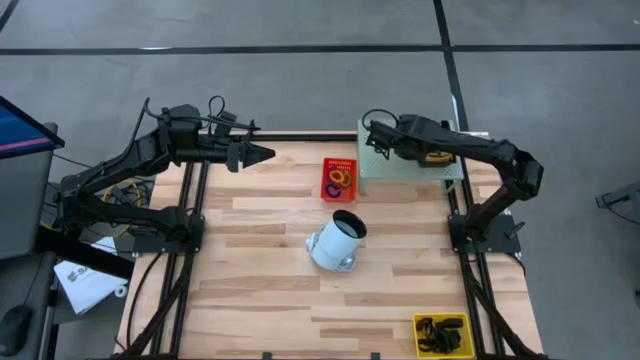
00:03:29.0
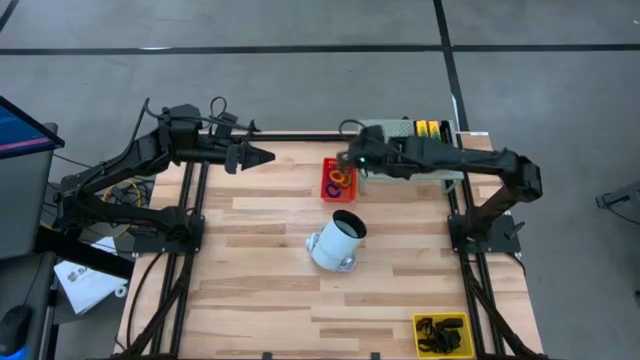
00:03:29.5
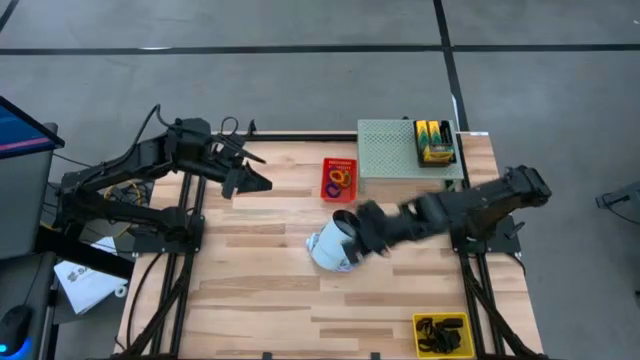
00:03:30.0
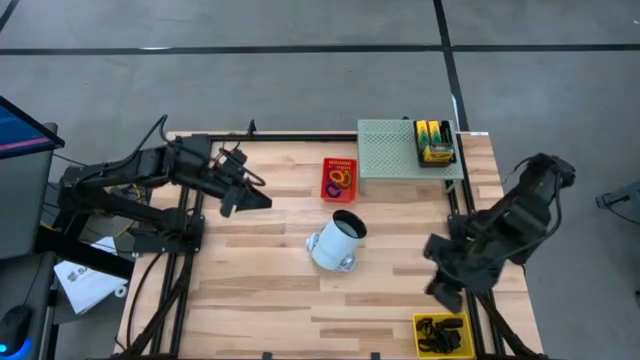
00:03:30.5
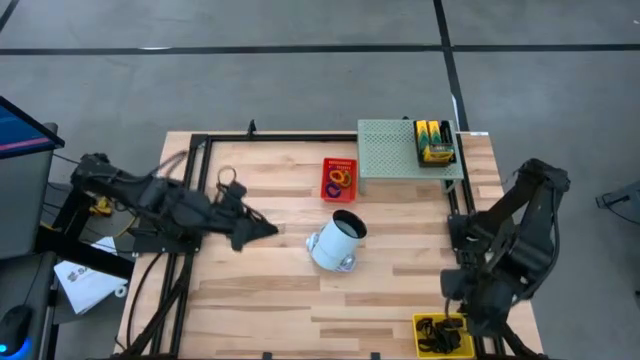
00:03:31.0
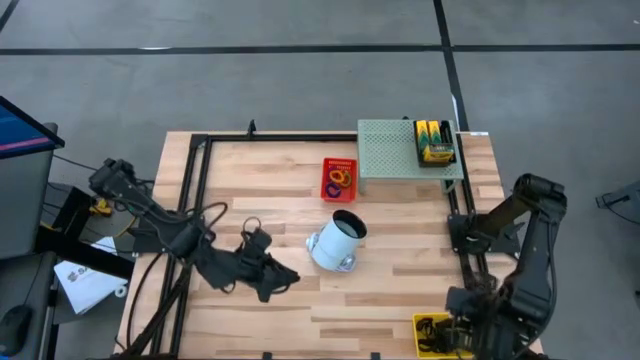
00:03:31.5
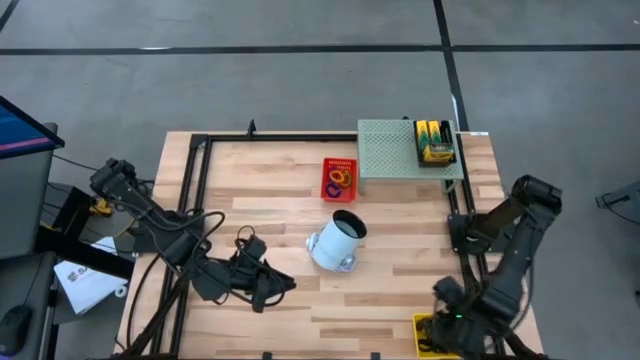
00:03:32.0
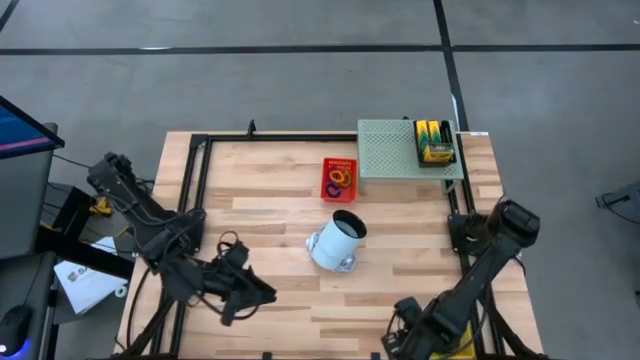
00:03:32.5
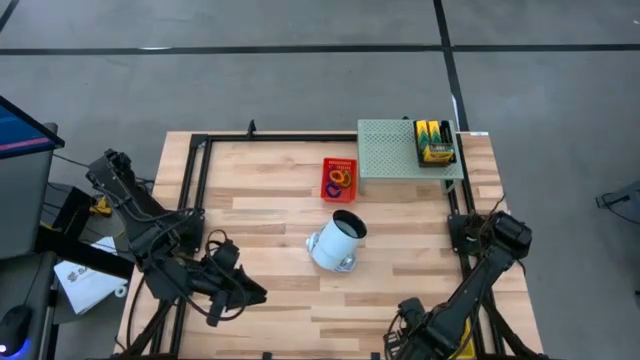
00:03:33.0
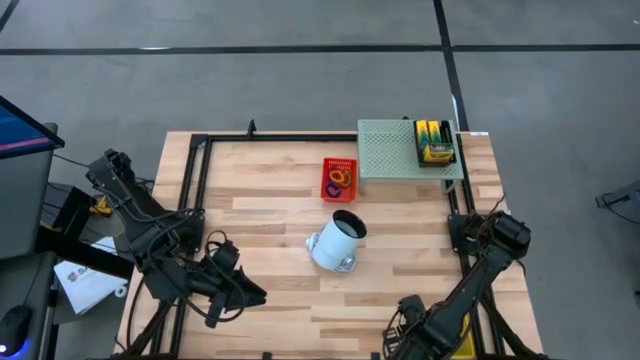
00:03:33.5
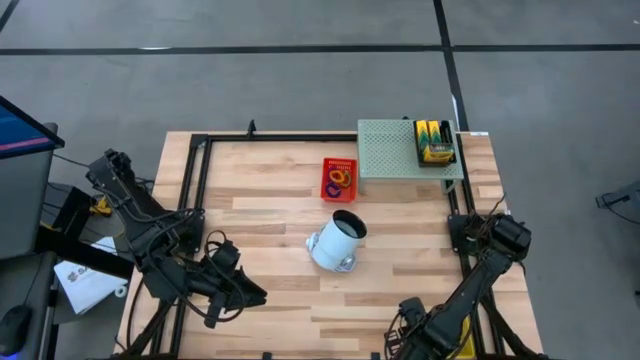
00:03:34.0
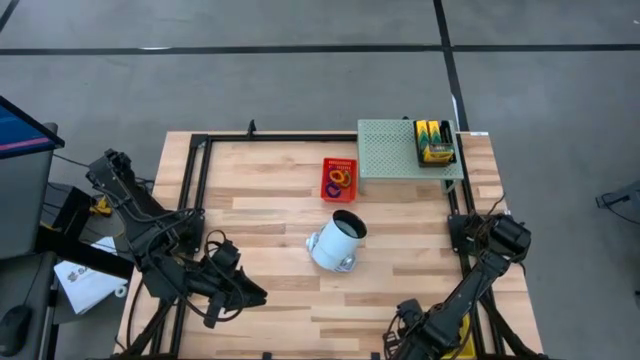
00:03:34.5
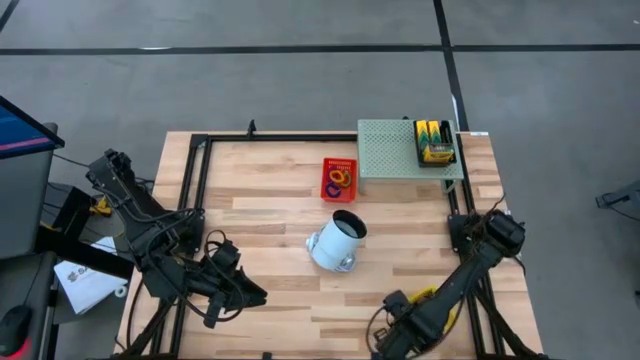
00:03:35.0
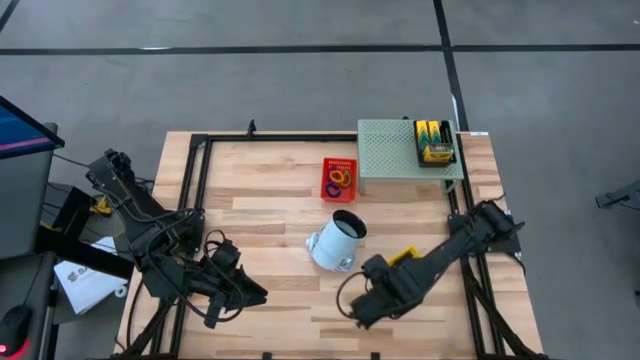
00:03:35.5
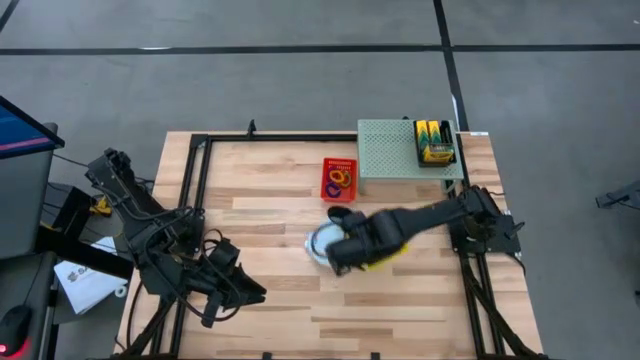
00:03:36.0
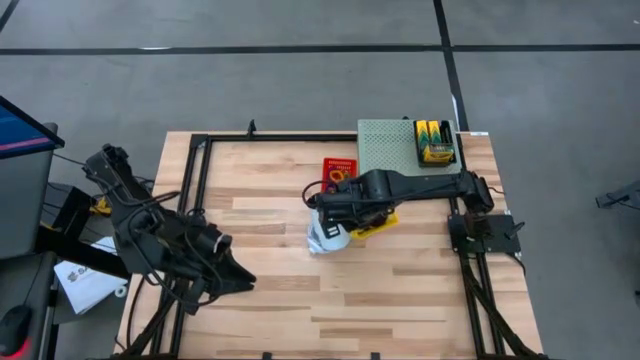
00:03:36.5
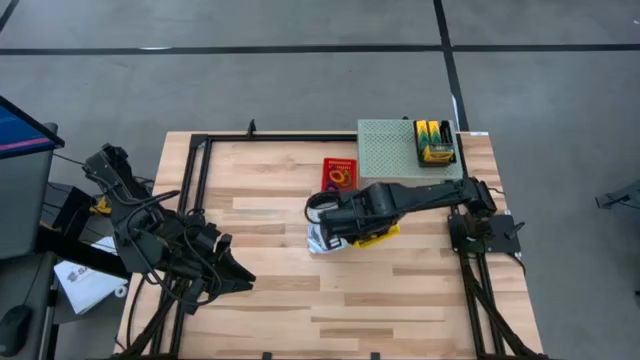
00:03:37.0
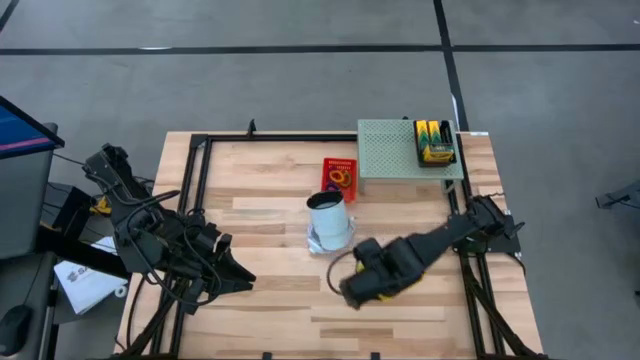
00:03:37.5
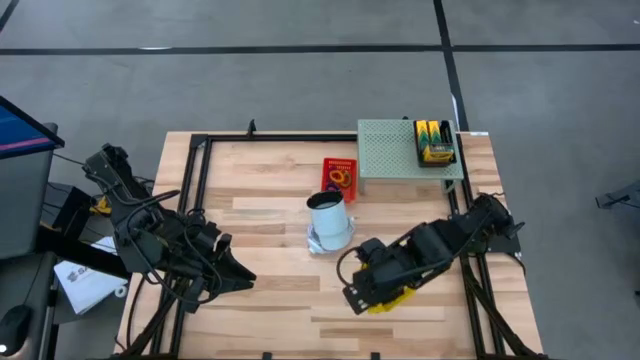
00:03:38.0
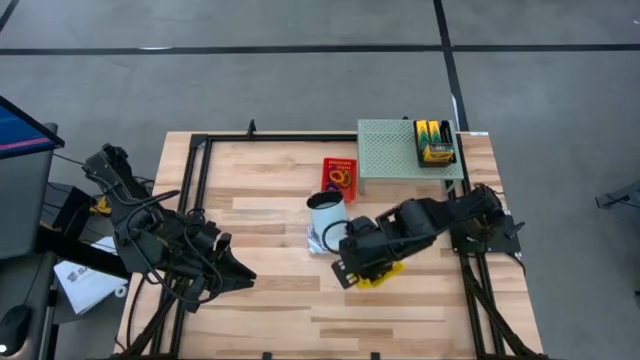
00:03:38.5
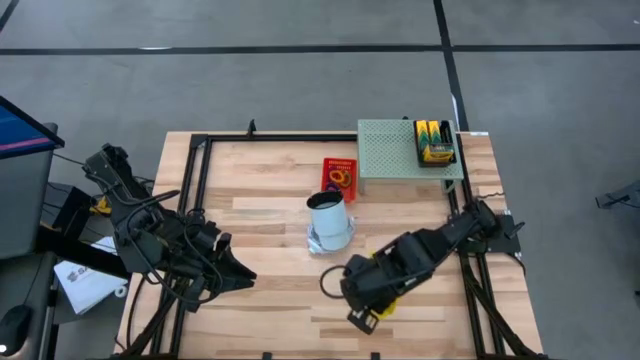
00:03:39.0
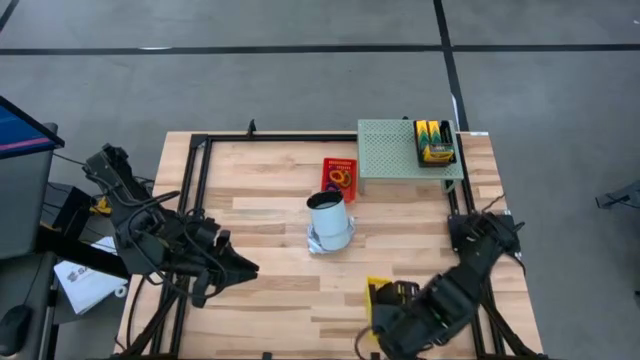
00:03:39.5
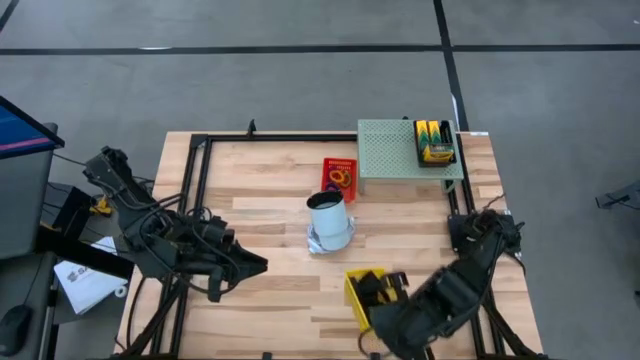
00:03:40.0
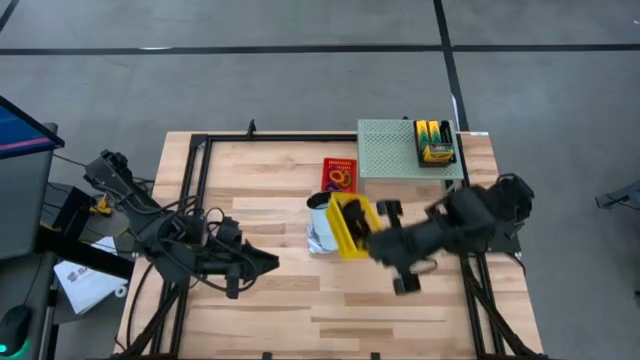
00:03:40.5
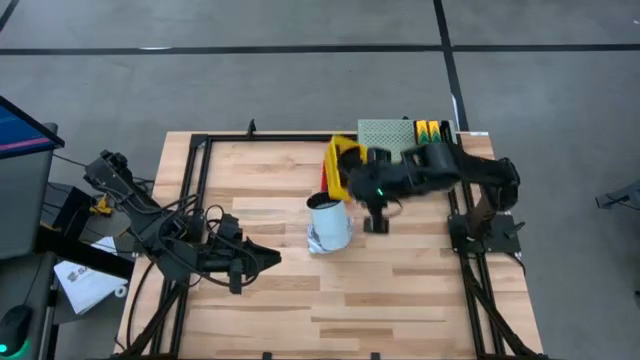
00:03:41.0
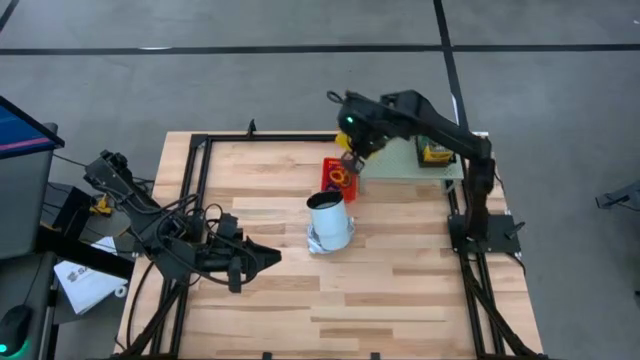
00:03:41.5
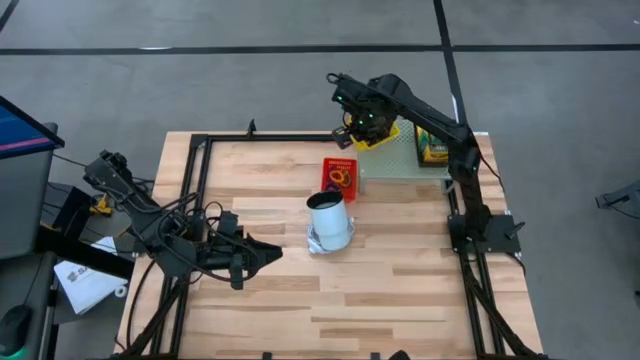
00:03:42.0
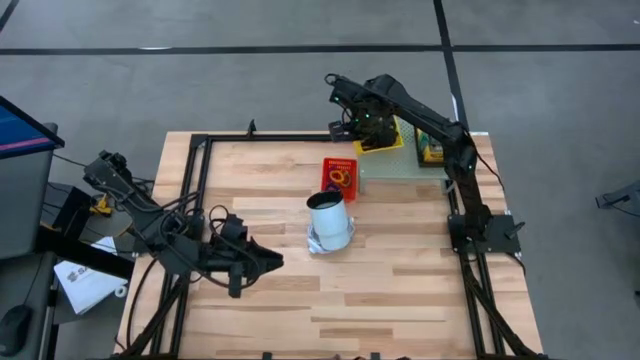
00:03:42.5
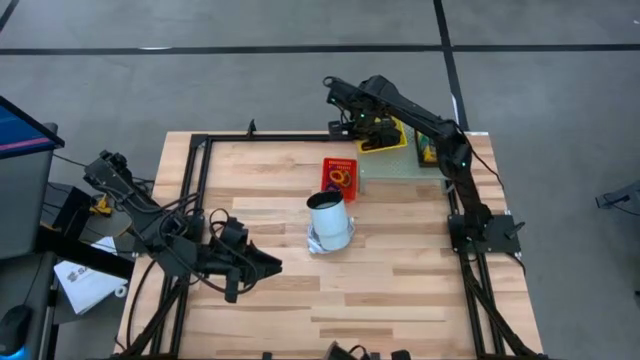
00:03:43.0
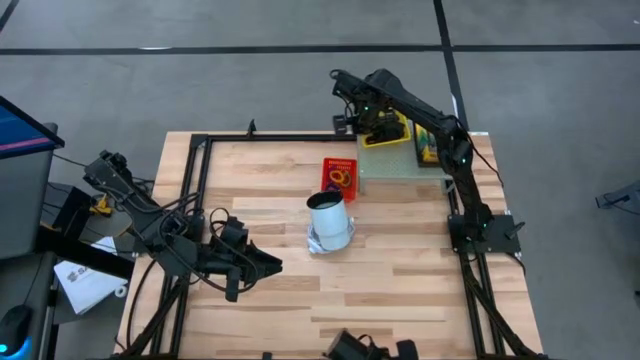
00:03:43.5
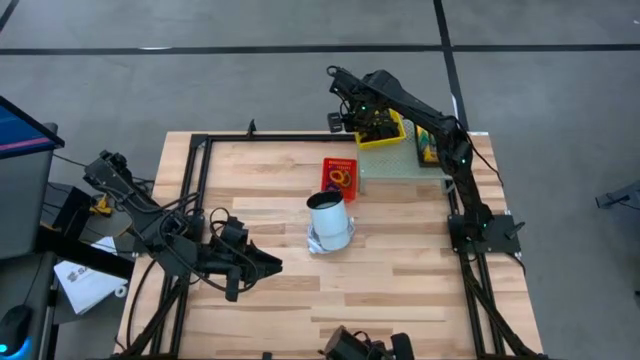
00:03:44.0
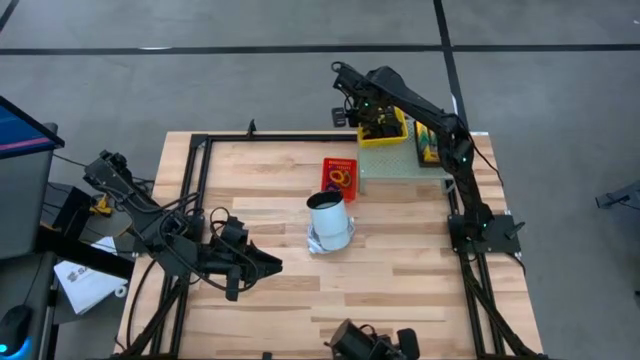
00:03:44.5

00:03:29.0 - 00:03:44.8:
Task: Pick & Place Office Desk Supplies
Put the yellow bin on the shelf

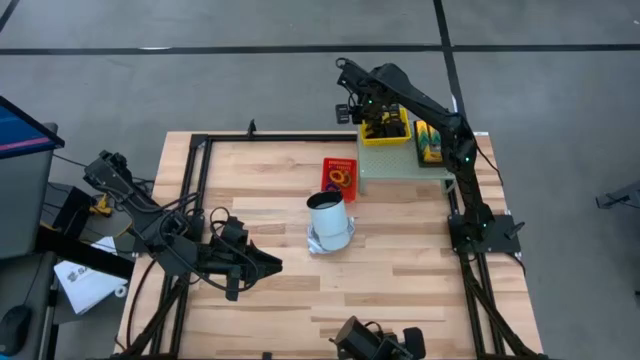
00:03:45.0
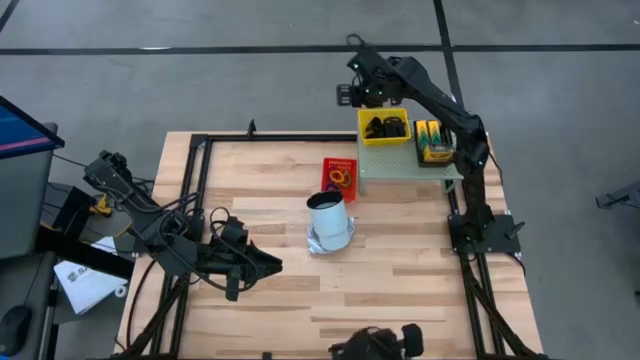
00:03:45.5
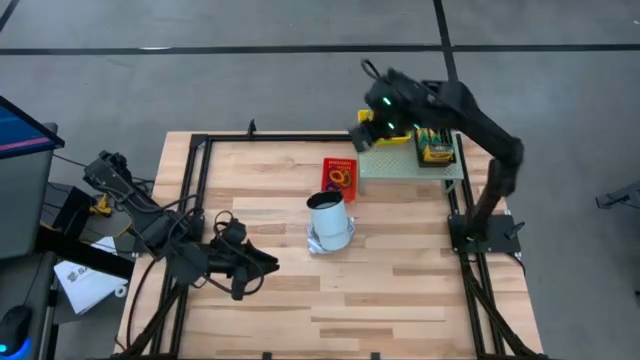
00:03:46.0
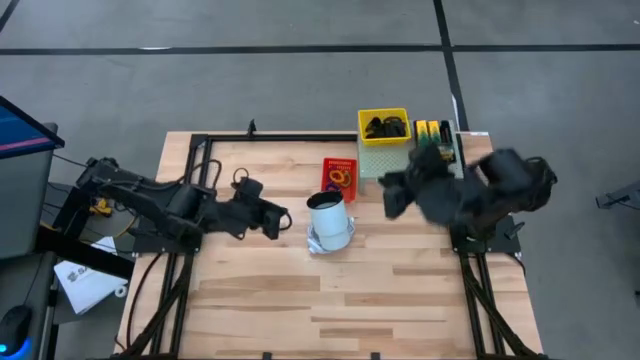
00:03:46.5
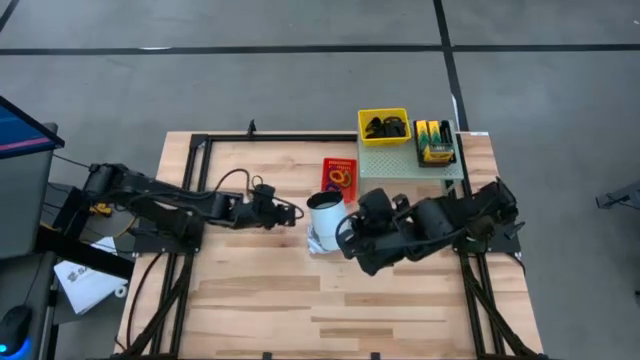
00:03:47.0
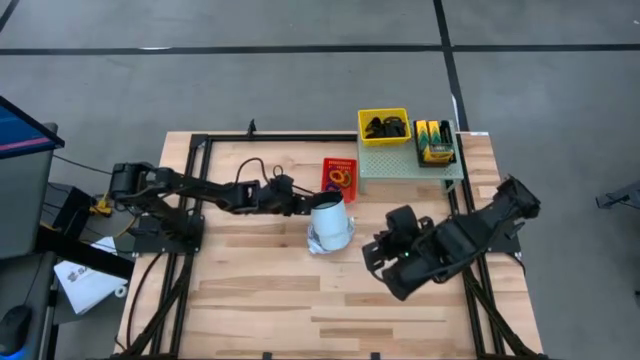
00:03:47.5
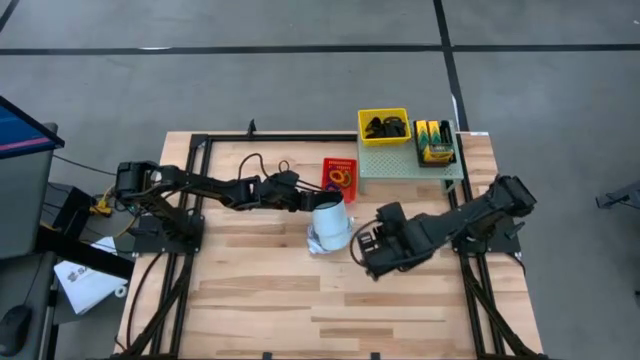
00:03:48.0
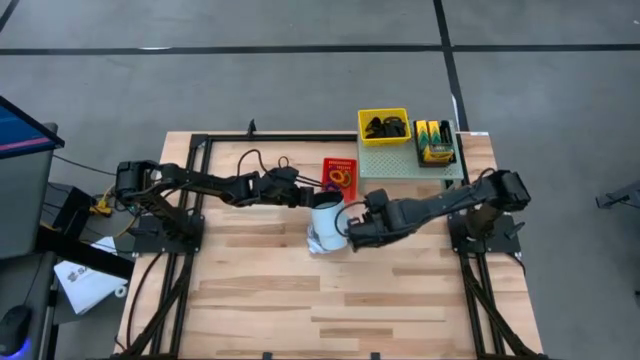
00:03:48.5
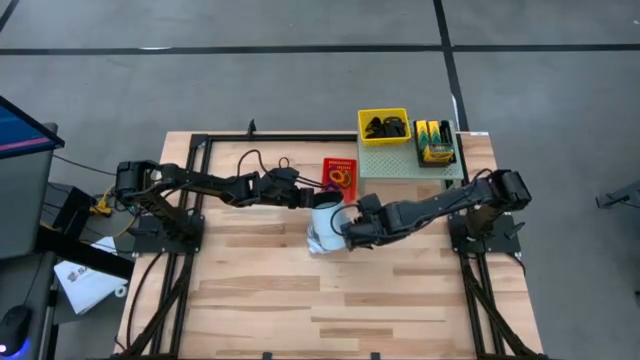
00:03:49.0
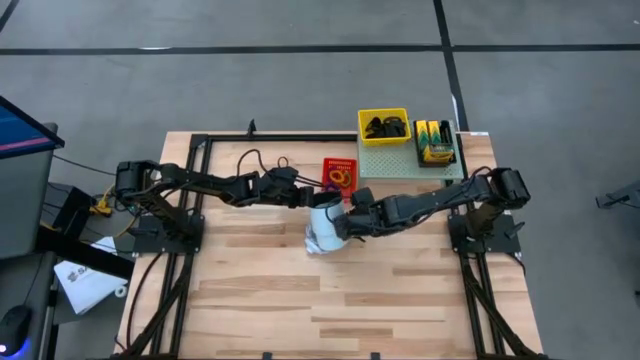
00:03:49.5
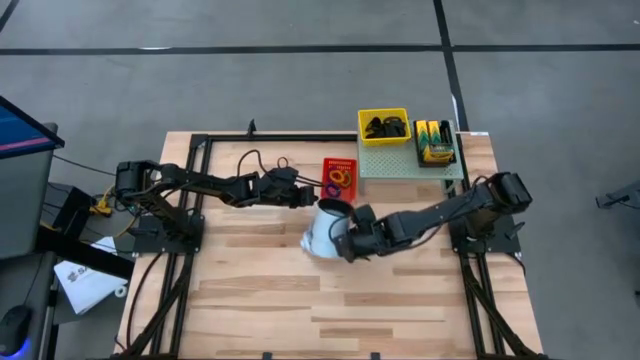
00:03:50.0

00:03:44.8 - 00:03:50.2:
Adjust the white adjustable surface light

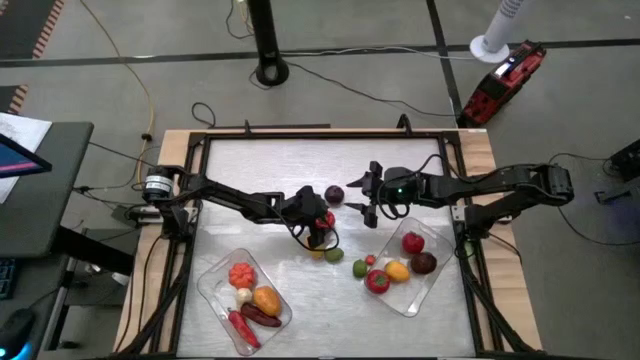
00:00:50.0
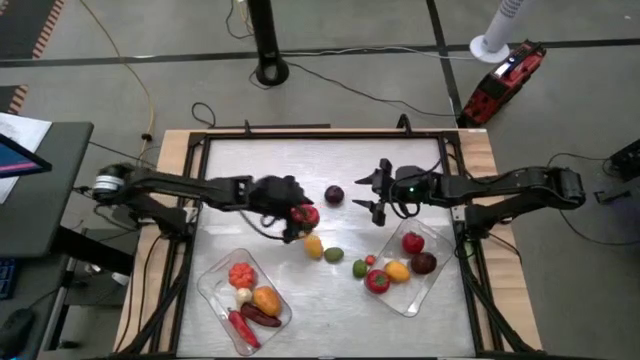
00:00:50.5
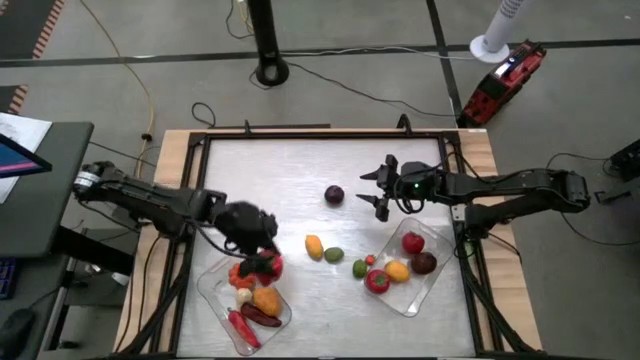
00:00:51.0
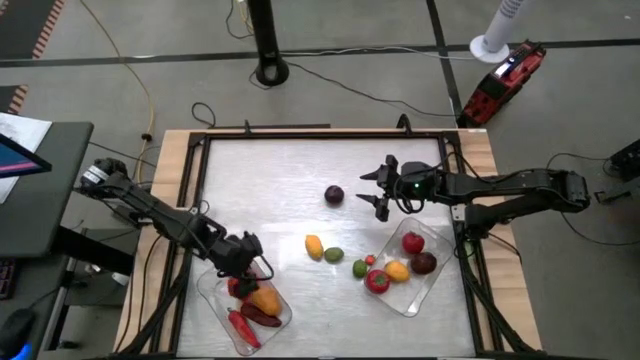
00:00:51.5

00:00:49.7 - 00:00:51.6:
Task: Sort produce into baskets
Put the bell pepper into the left transparent bin
